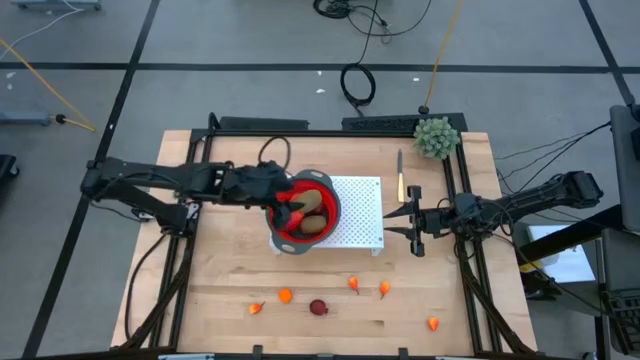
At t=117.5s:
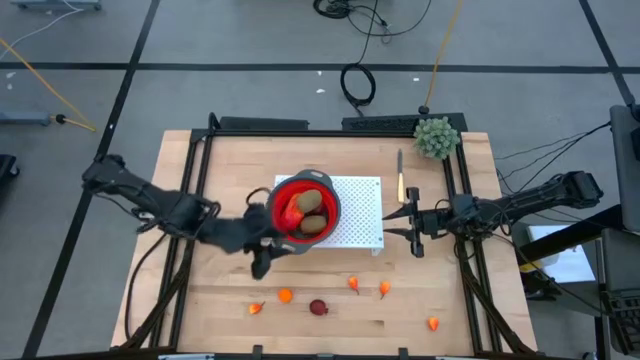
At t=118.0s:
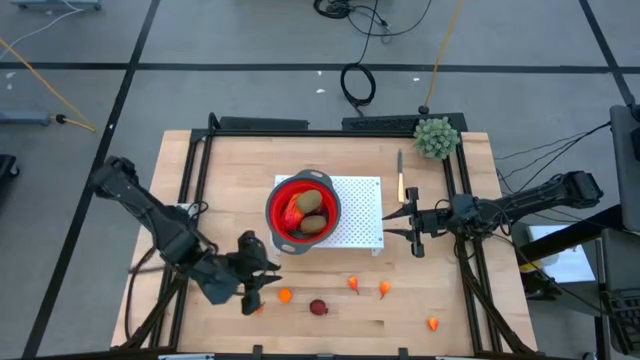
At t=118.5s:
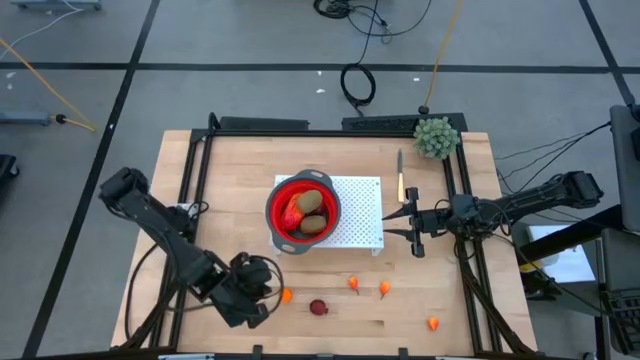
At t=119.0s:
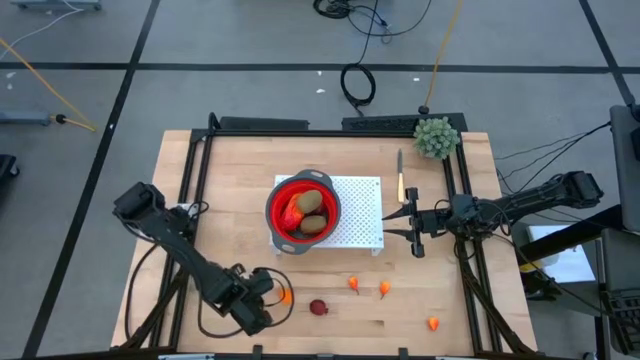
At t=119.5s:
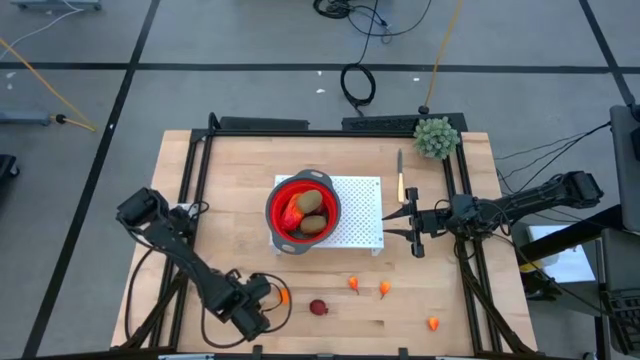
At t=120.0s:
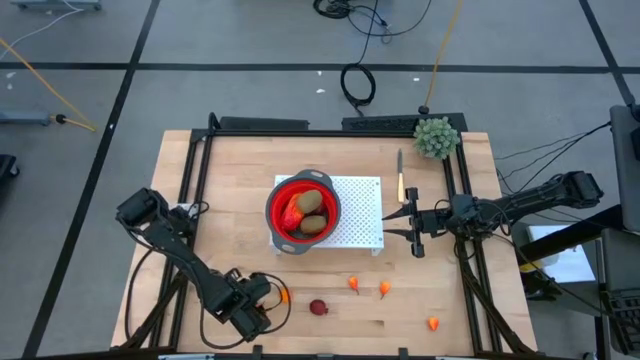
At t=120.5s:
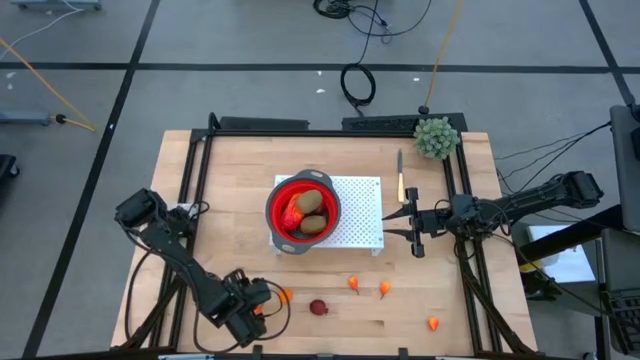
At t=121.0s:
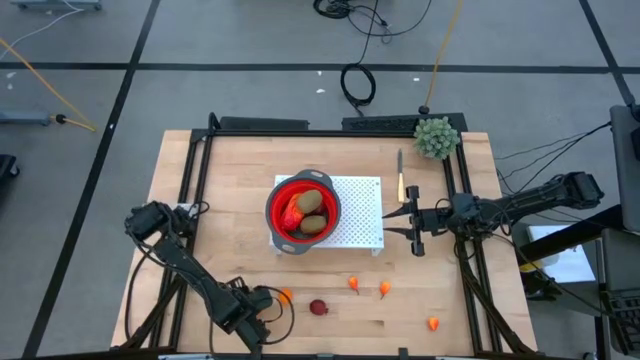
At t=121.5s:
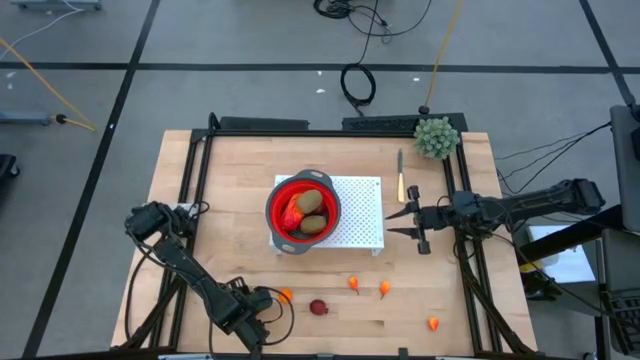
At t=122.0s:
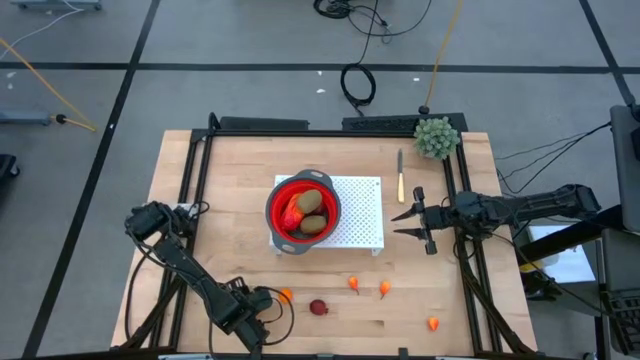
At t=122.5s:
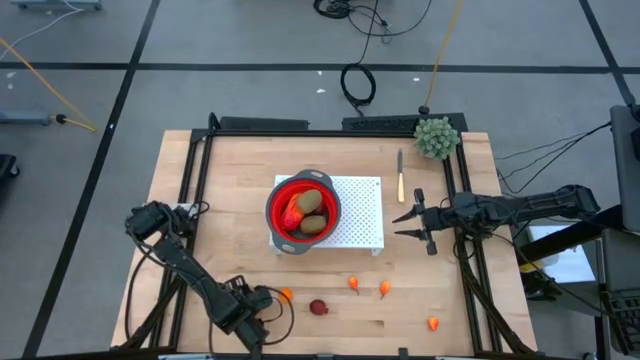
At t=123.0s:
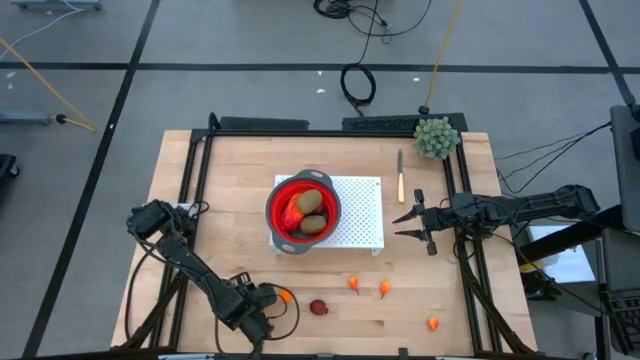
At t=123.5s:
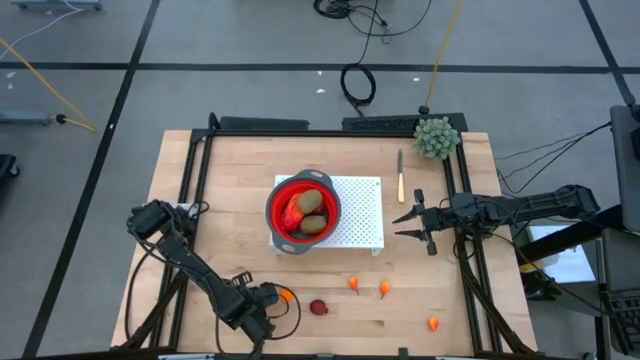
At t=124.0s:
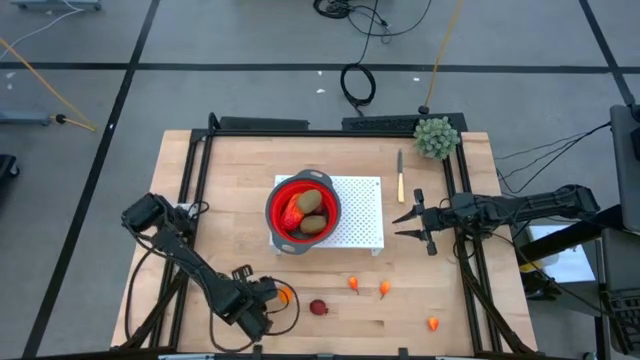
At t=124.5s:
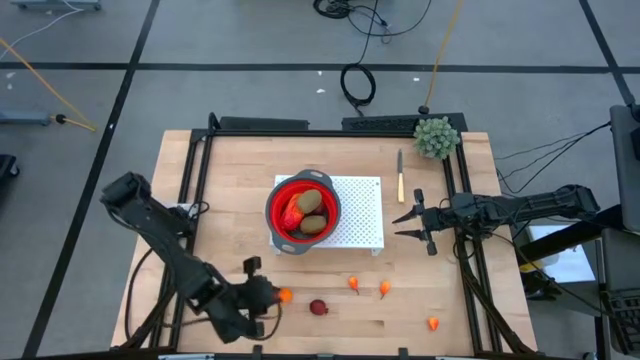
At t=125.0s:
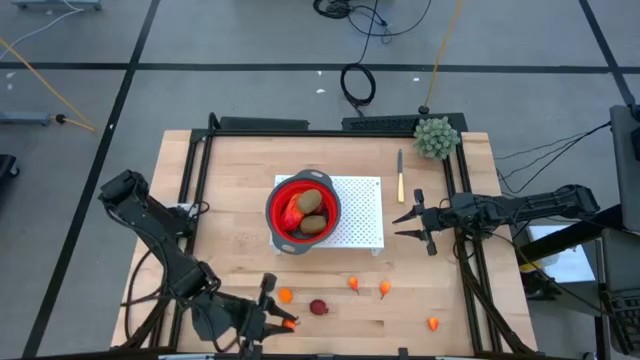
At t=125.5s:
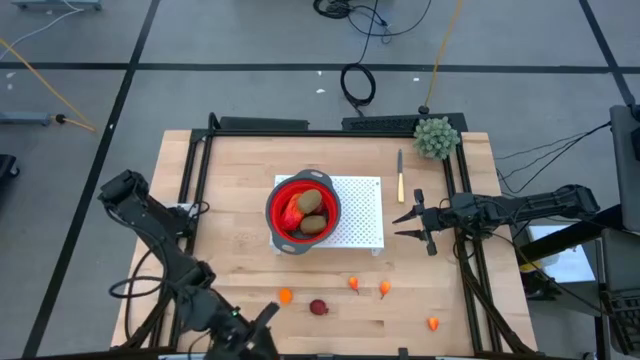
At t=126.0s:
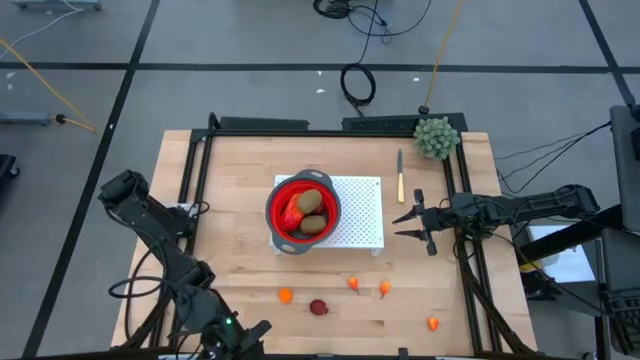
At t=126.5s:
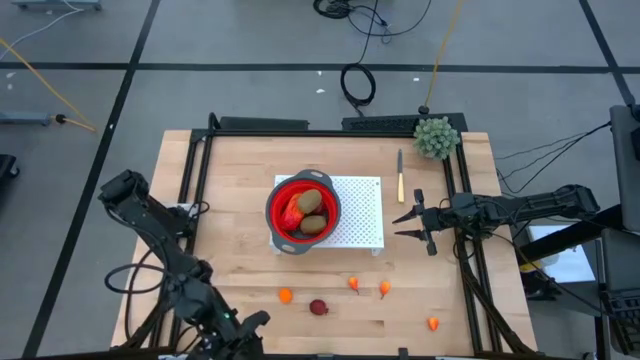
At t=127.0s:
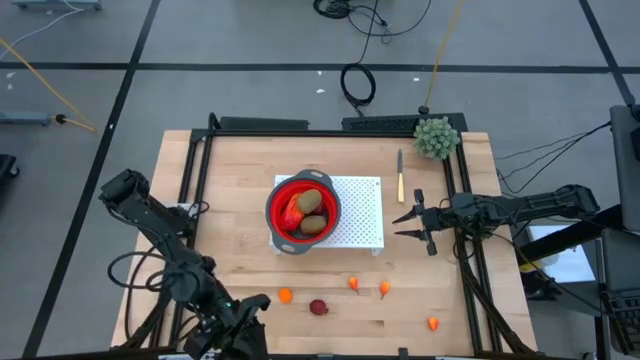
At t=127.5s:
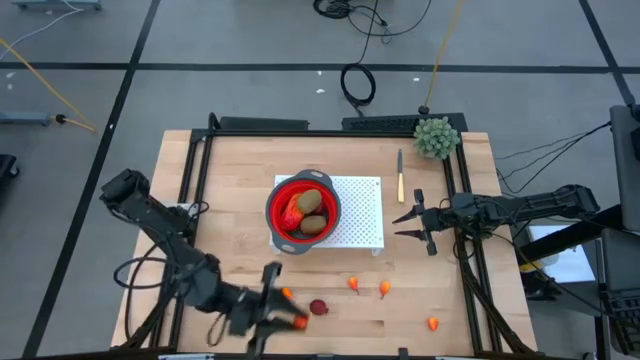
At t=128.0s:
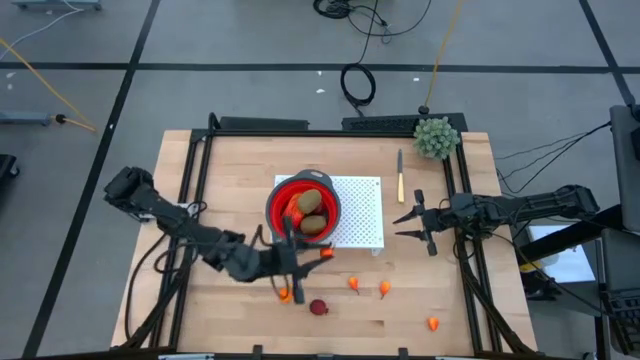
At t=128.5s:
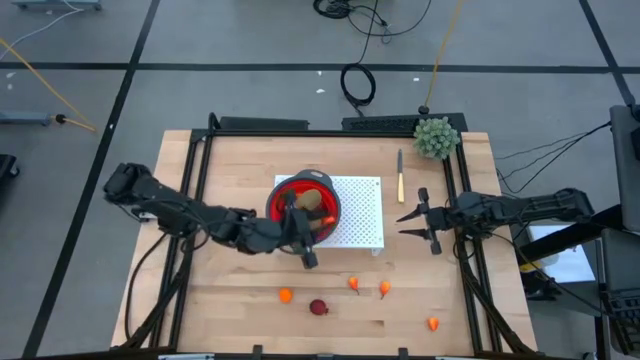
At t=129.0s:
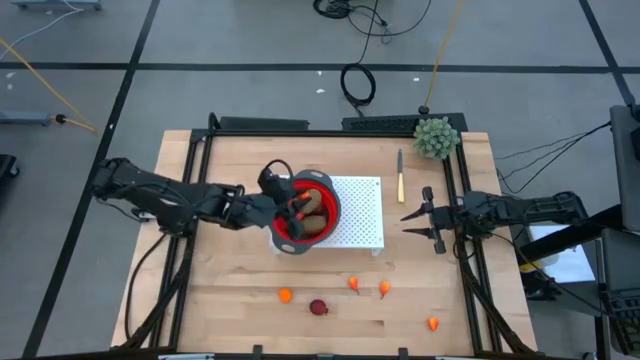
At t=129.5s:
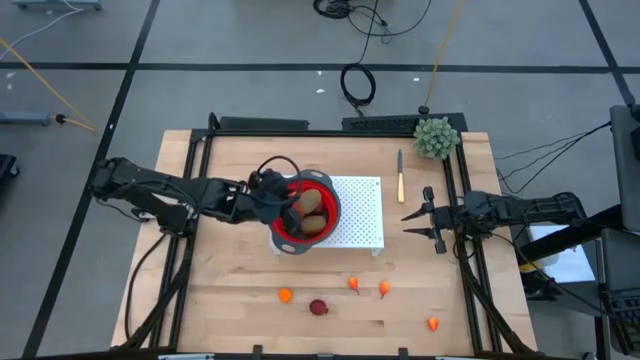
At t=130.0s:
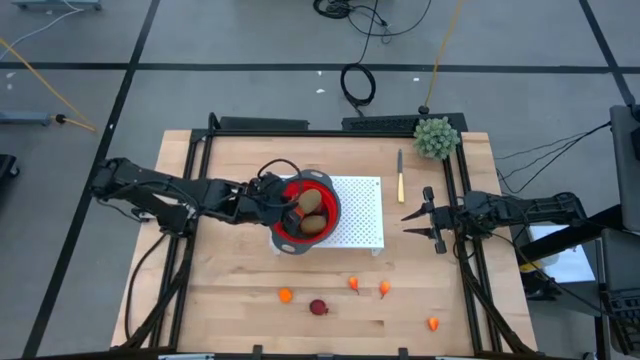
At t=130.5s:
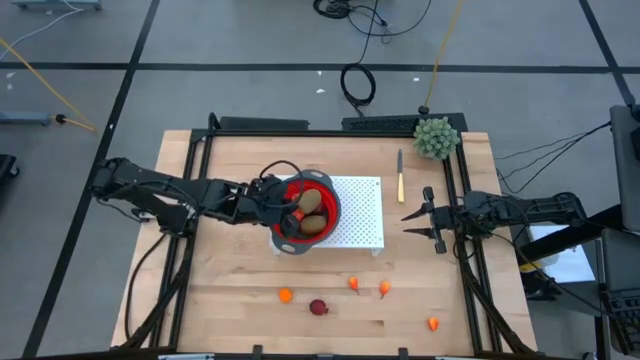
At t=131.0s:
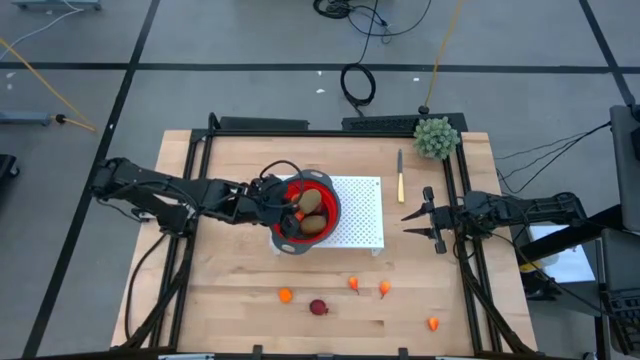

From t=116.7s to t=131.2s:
Task: Pick & Place Fruit
Put the peach into the strainer bowl on the shelf

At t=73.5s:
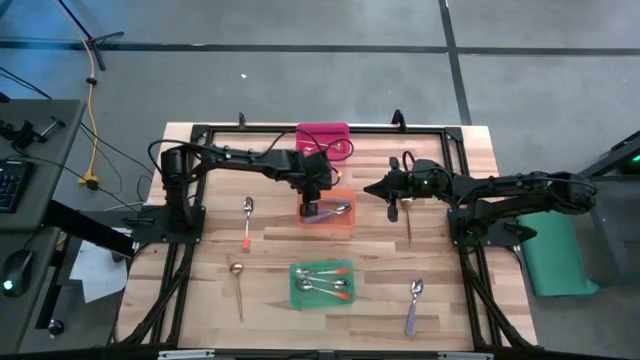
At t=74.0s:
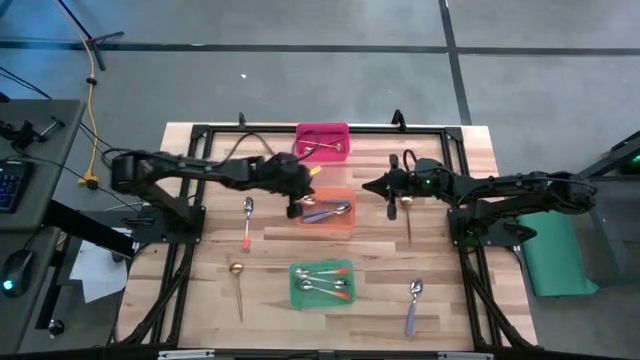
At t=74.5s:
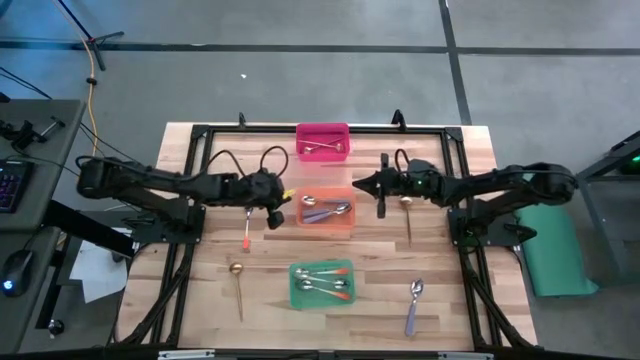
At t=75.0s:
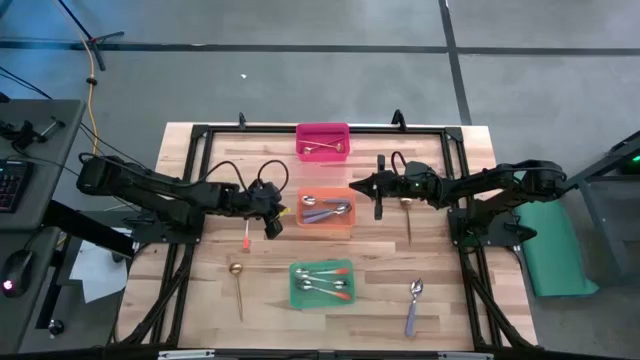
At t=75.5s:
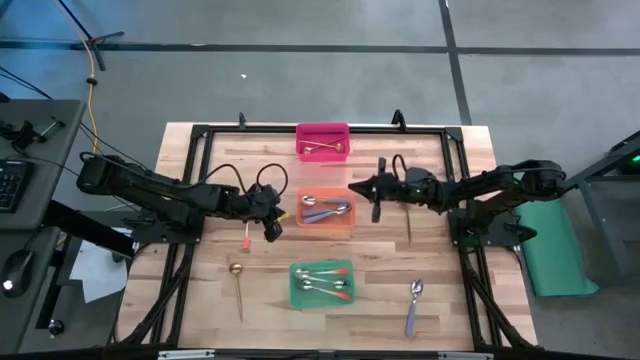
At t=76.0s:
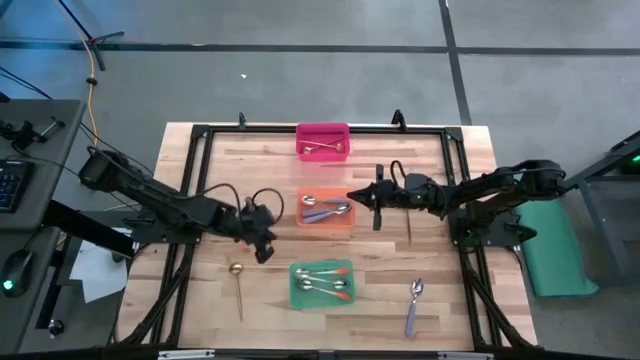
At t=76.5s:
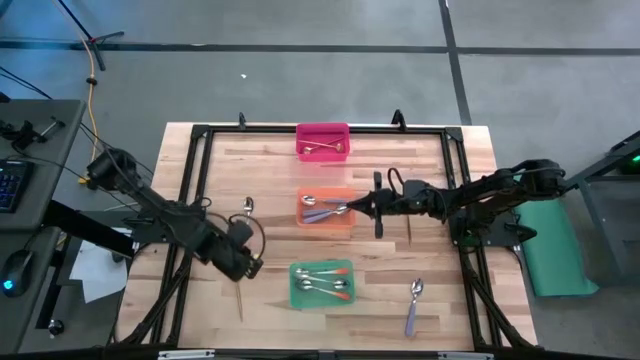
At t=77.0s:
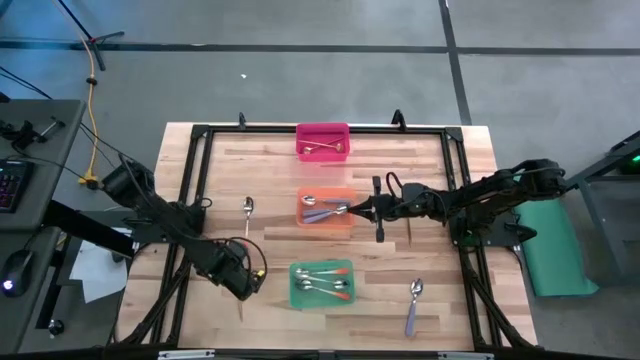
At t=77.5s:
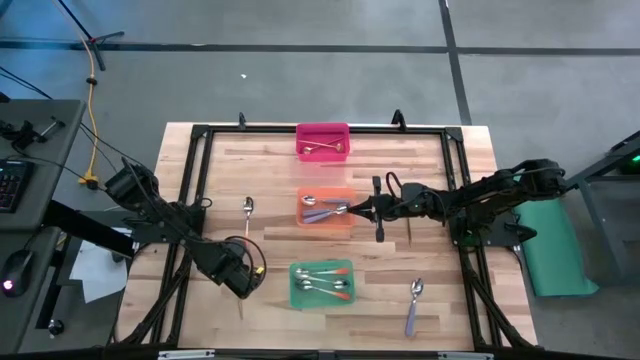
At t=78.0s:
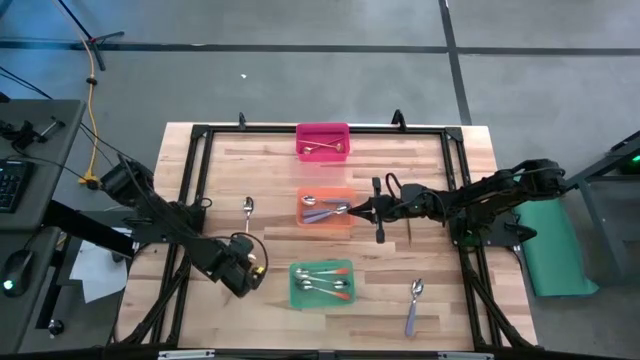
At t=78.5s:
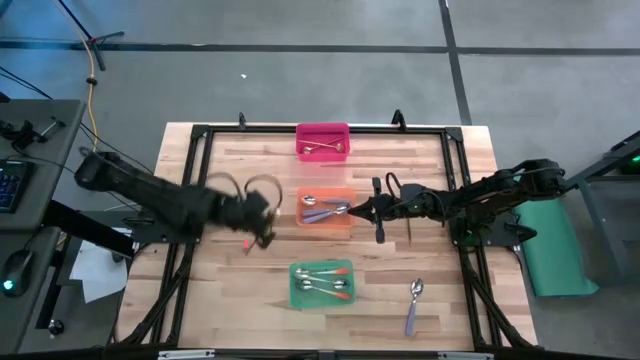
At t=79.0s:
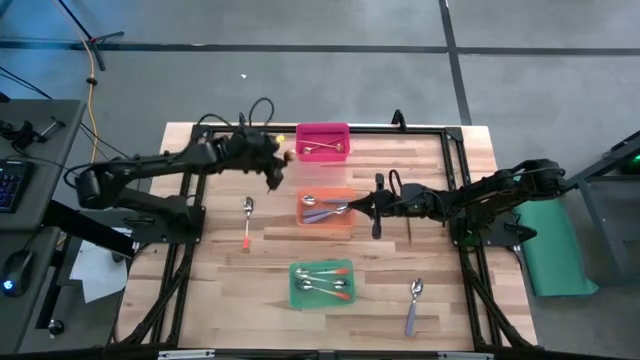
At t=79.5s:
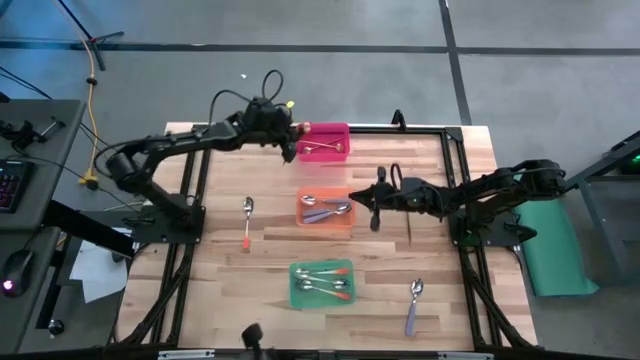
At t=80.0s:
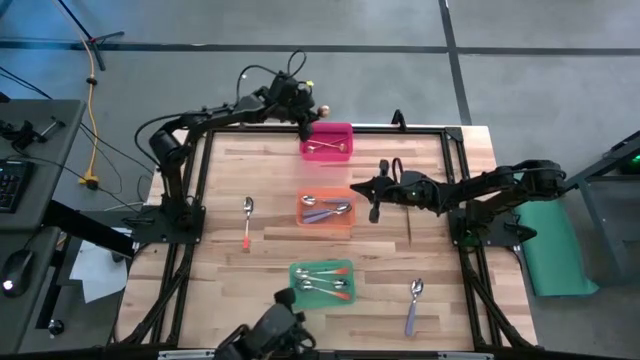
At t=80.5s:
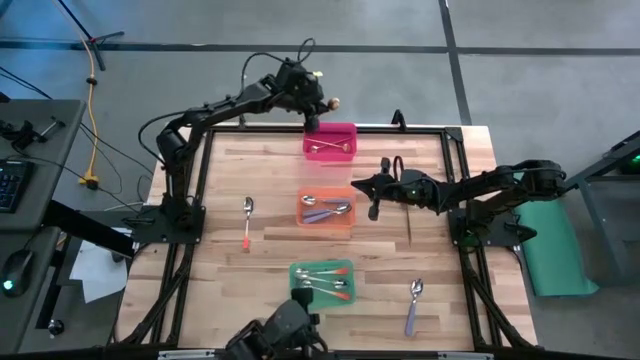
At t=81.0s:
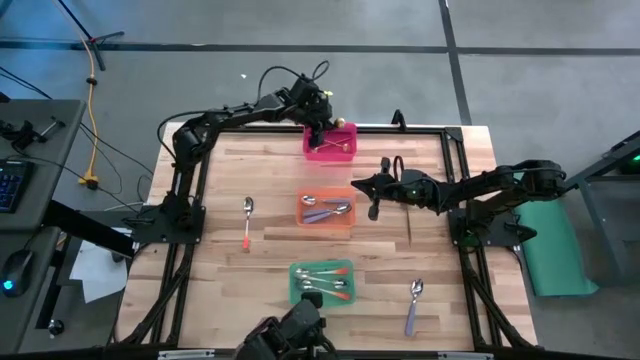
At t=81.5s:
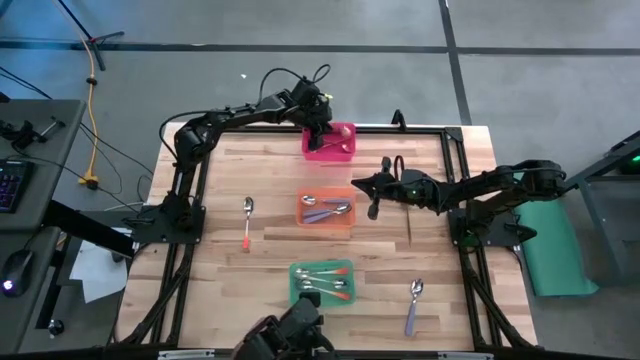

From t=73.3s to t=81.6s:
Task: Sort silverware by color (type)
Put the left gold spoon into the red bin
